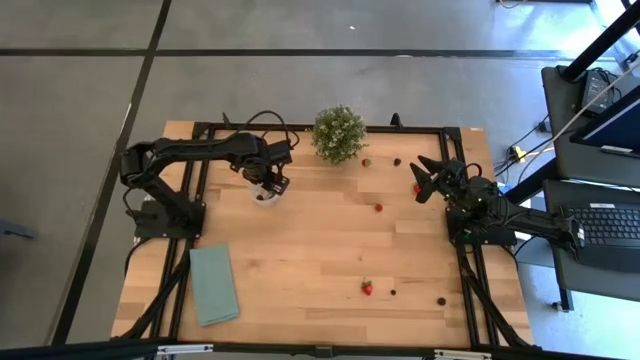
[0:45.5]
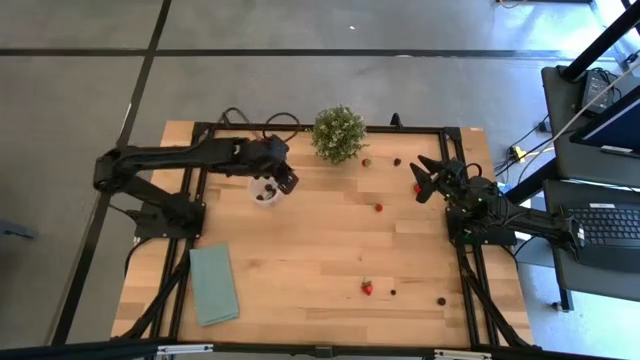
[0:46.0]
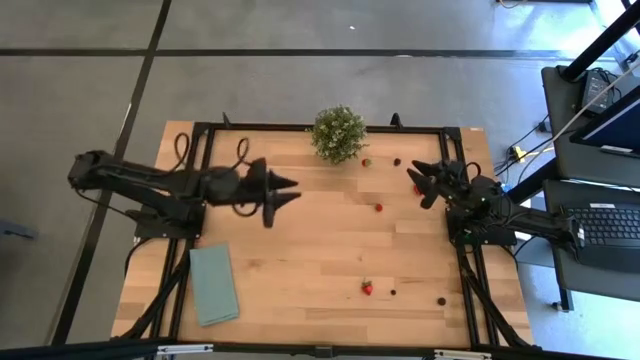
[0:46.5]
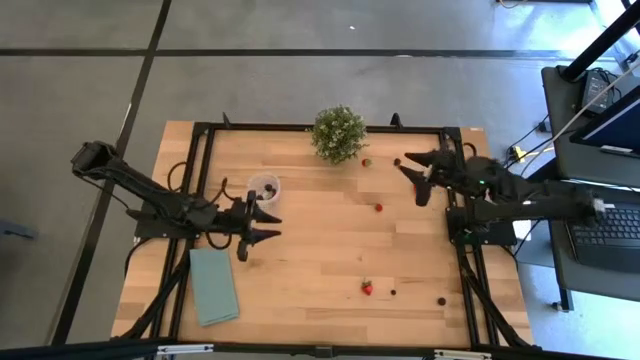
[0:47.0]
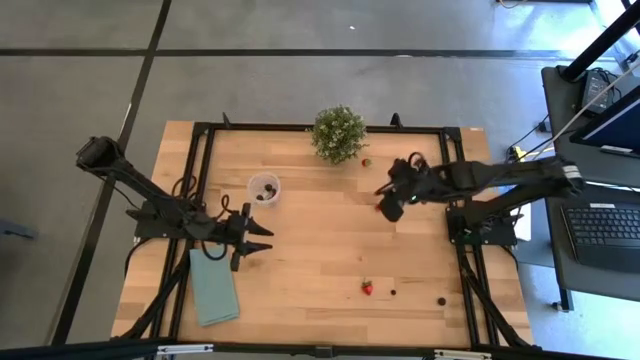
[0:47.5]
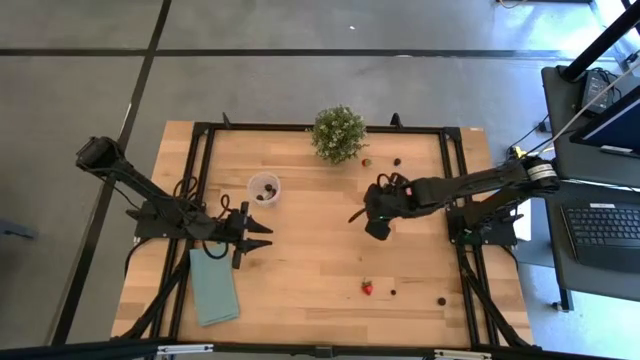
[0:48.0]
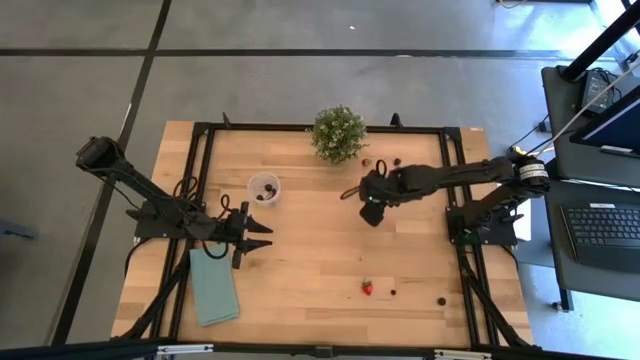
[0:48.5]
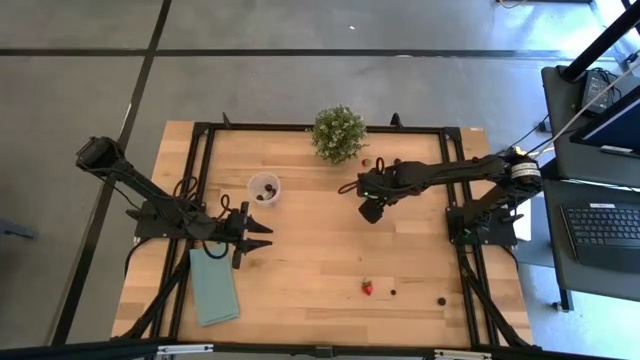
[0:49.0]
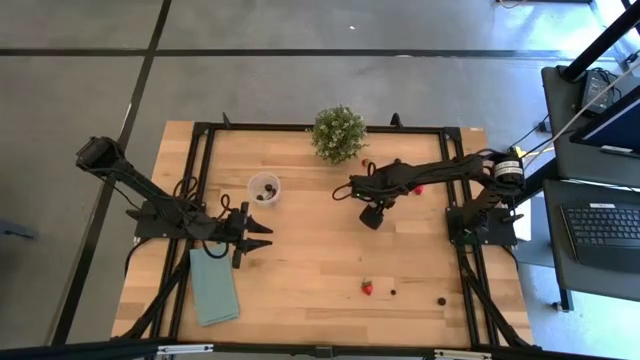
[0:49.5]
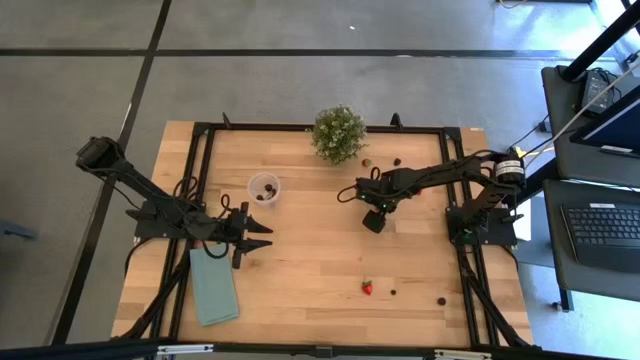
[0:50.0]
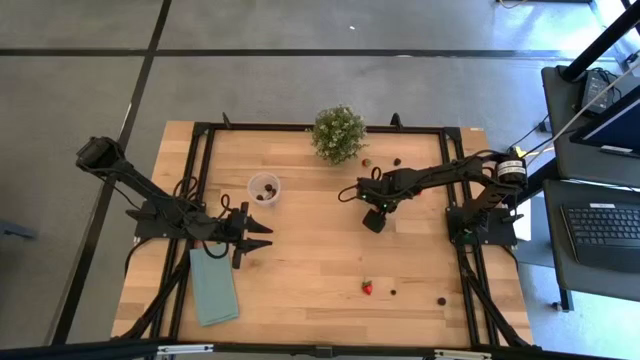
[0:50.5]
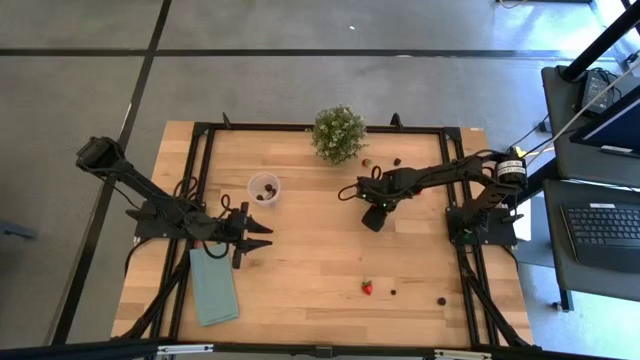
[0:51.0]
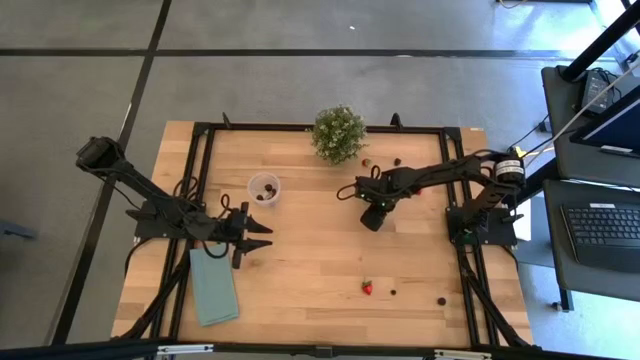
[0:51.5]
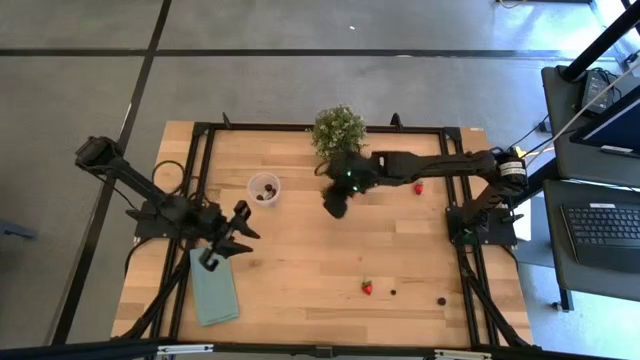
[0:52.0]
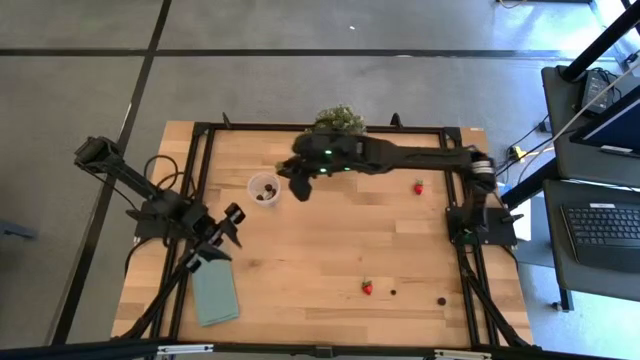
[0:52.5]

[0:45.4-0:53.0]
Task: Pick and placing Produce into tupperware
Put the red strawberry into the transparent container

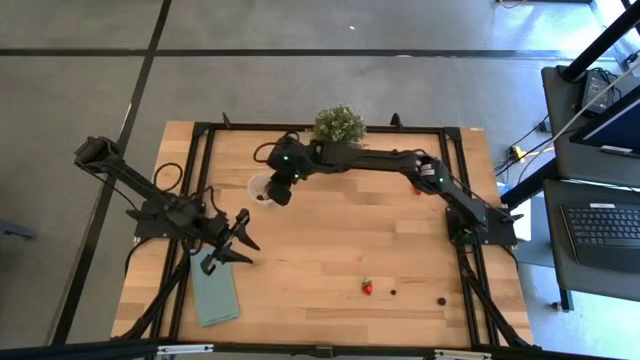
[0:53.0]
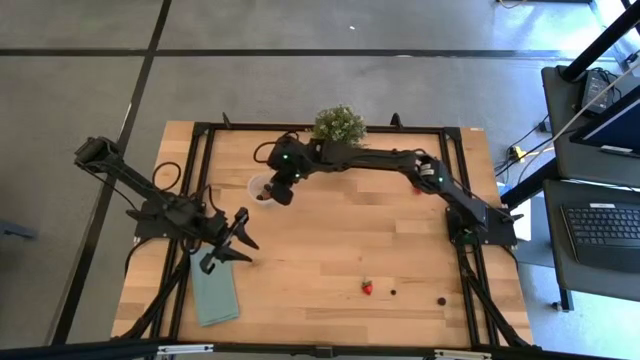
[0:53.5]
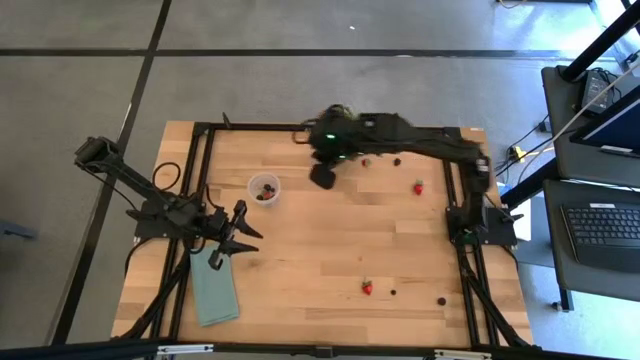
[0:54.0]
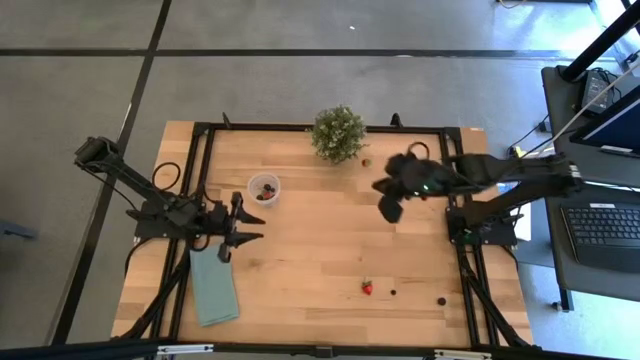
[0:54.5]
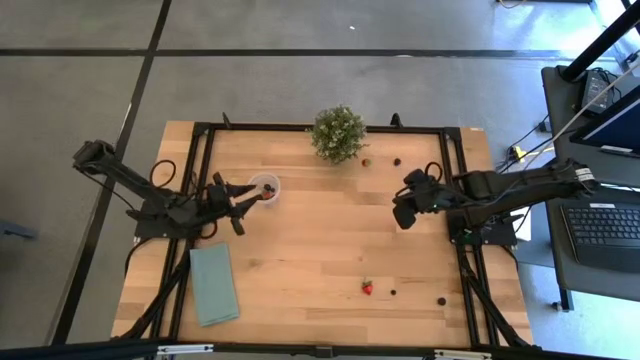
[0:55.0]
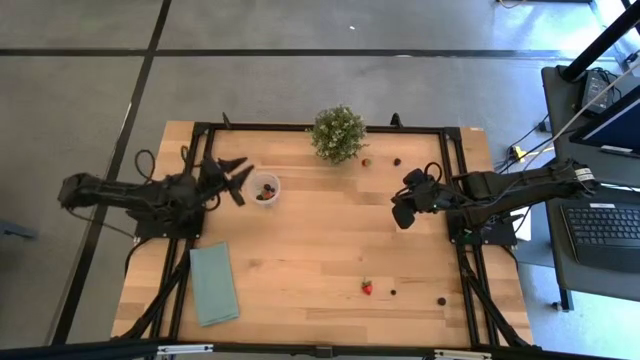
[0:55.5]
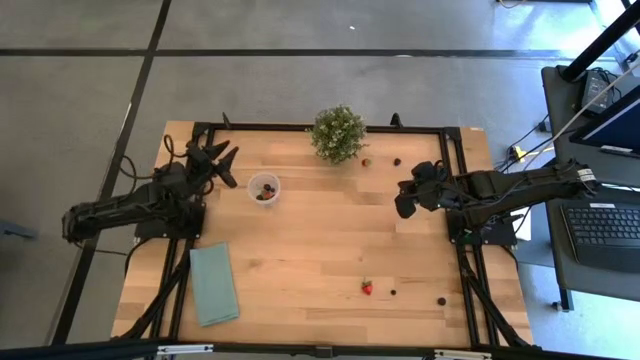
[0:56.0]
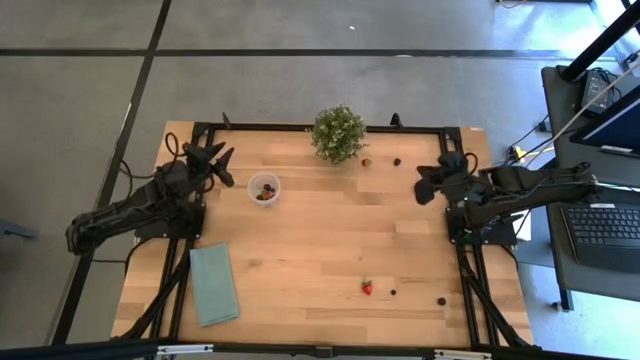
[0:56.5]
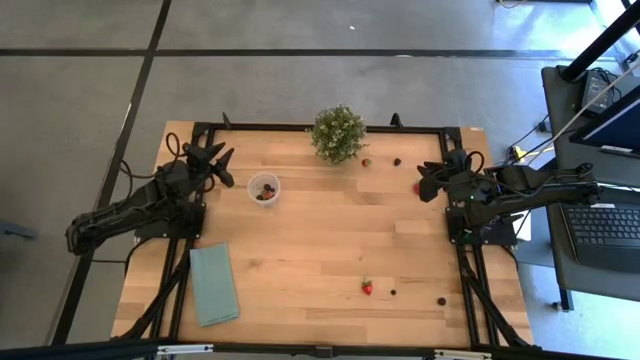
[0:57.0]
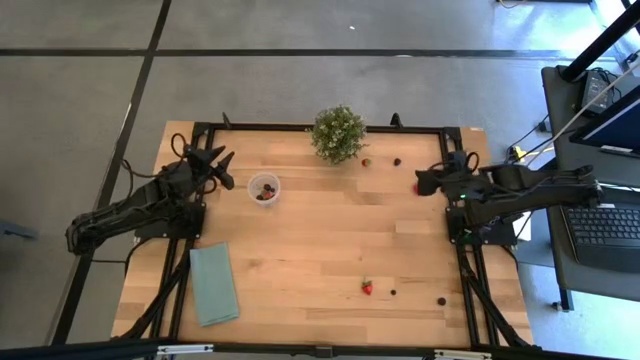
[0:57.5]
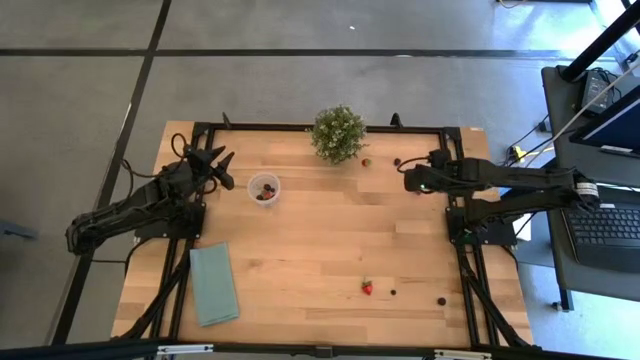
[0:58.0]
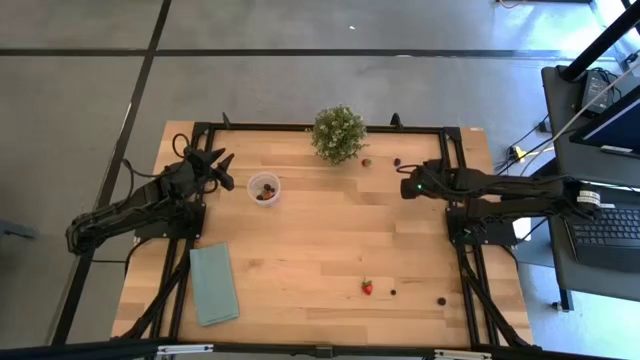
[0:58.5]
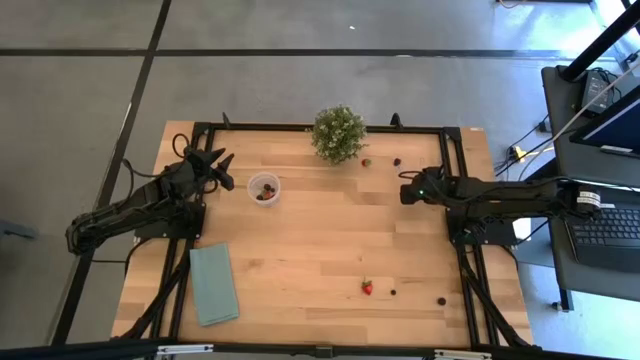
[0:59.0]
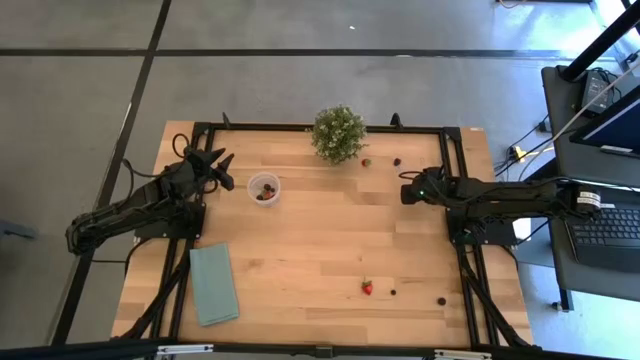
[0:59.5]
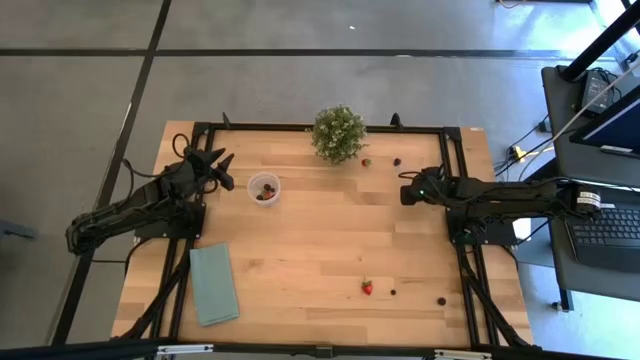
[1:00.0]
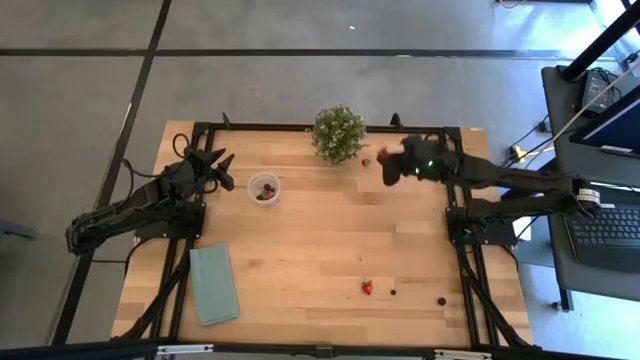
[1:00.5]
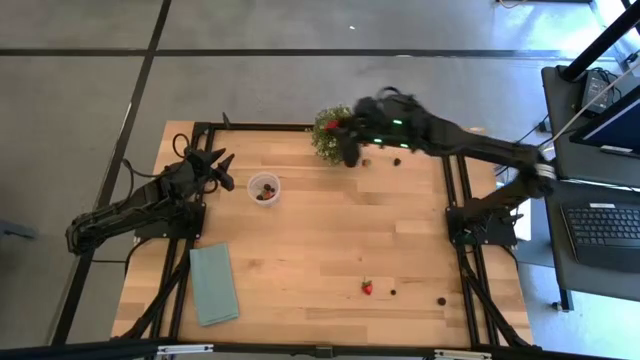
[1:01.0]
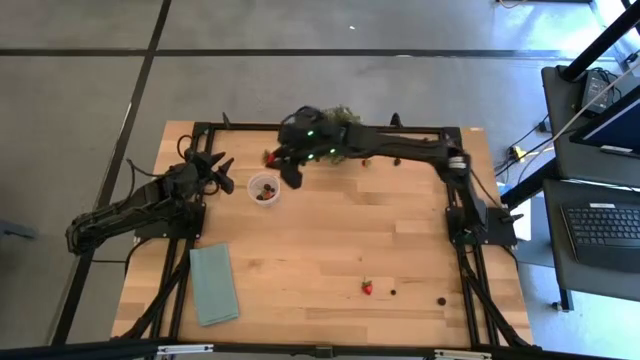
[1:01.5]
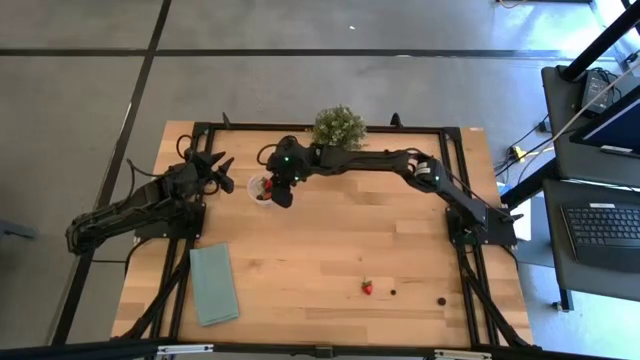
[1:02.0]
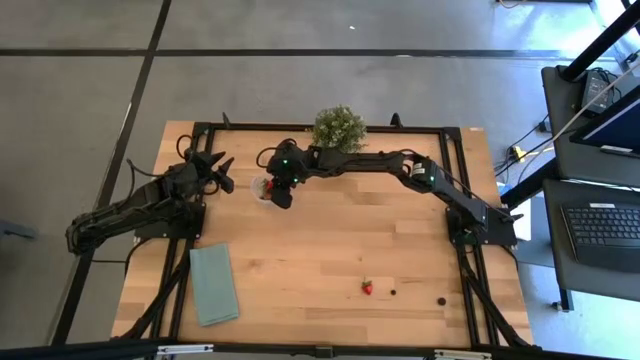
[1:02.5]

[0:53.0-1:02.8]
Put the red strawberry into the transparent container

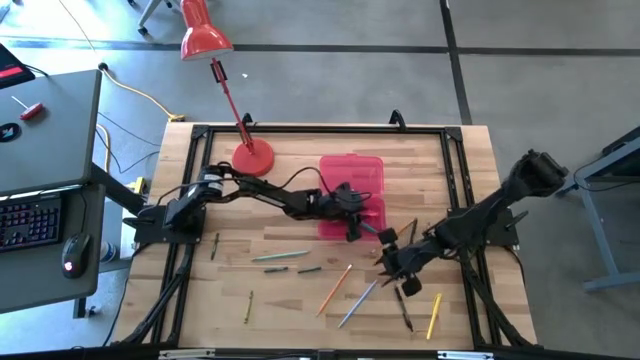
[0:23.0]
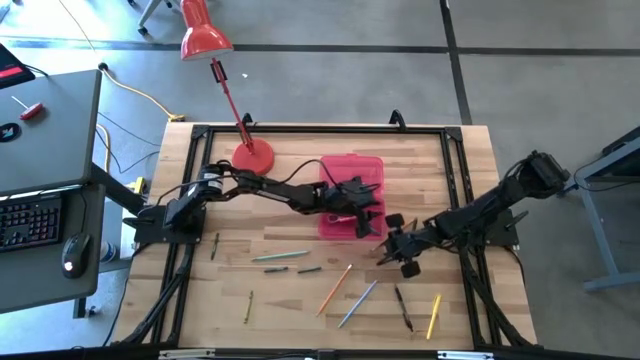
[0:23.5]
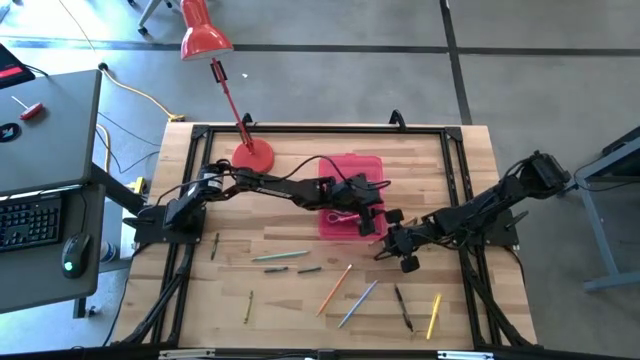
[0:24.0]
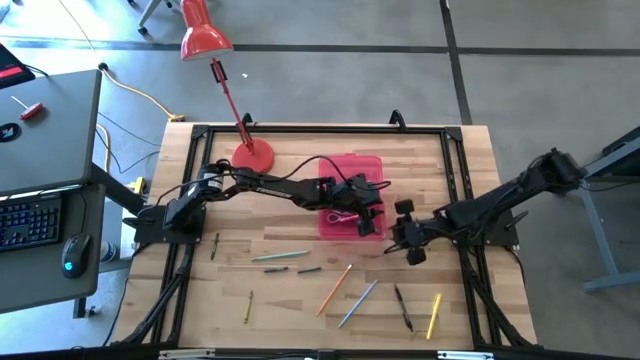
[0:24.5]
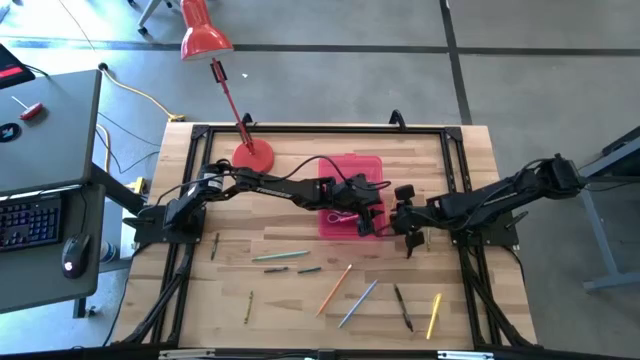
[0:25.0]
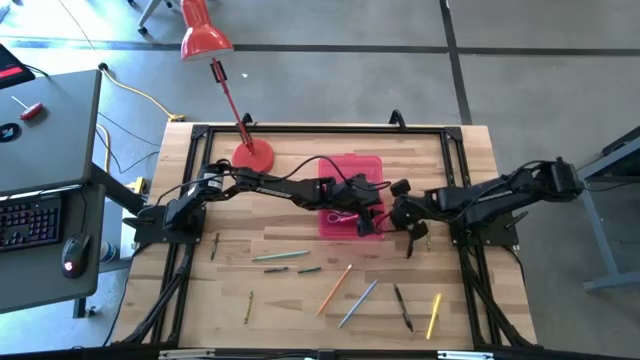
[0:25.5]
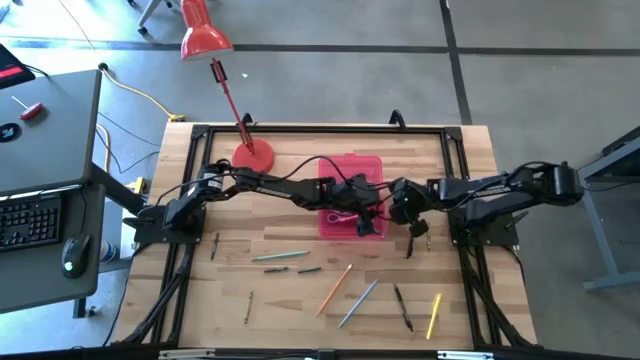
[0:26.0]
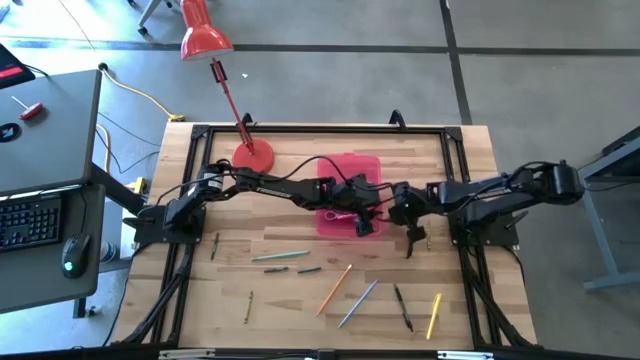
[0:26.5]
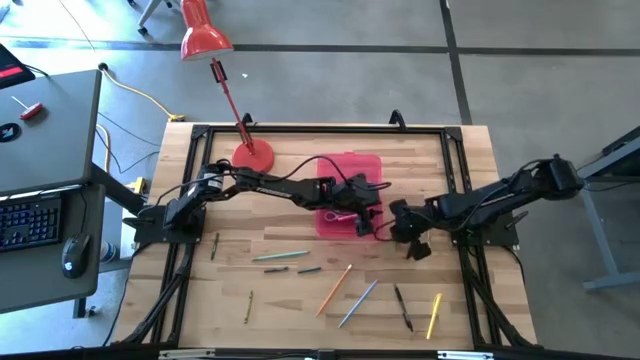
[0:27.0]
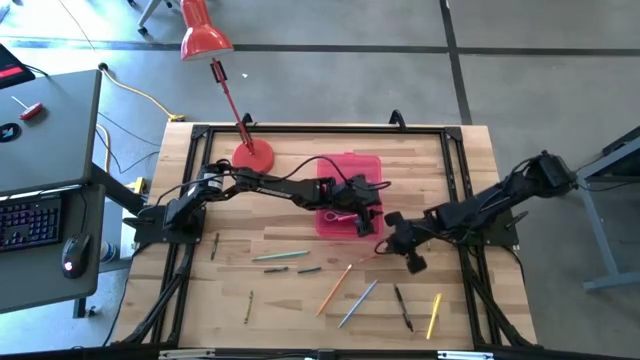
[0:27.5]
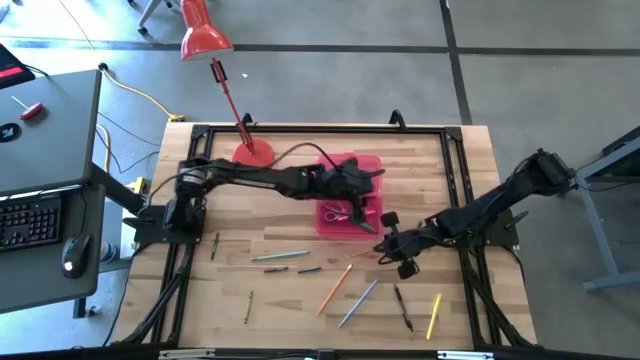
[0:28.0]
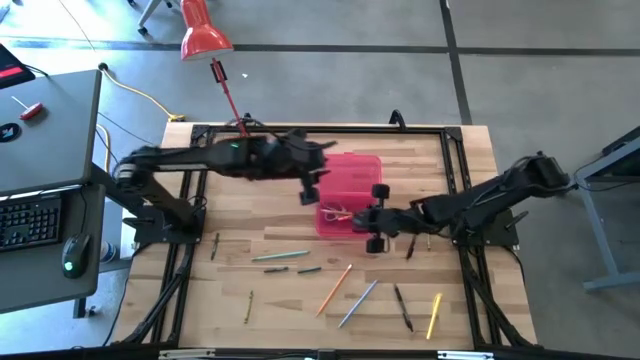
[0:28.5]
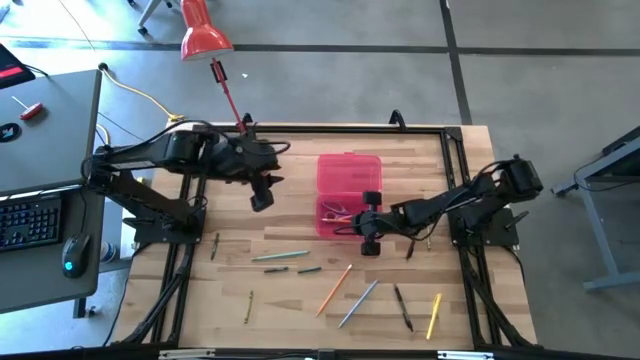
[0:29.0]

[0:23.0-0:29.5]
Task: Pick & place school supplies into a supply box
Put the top orange pencil into the red supply box
